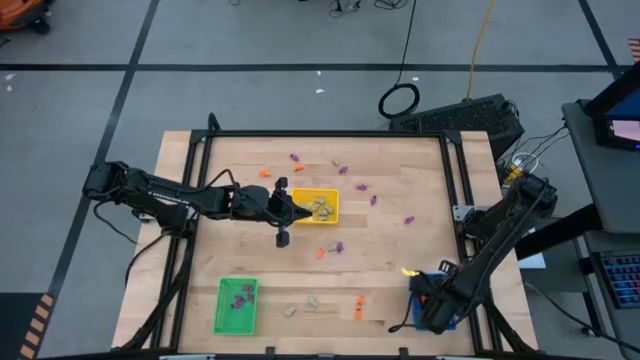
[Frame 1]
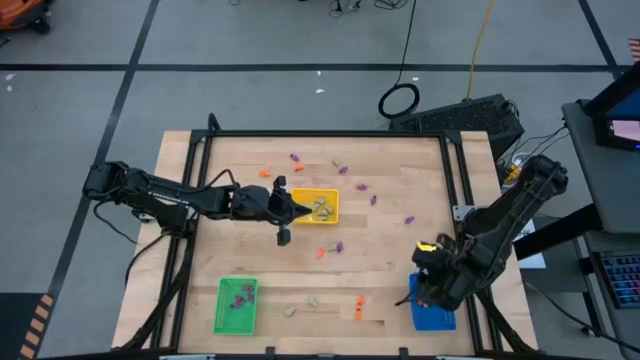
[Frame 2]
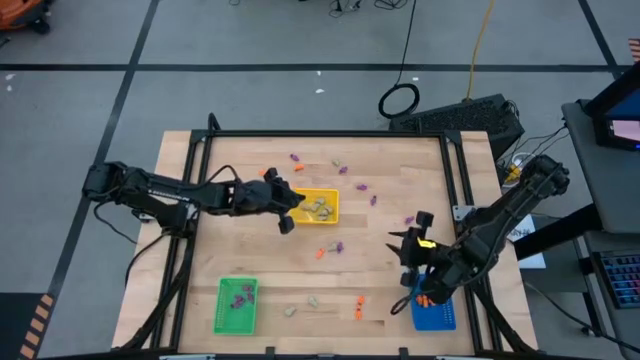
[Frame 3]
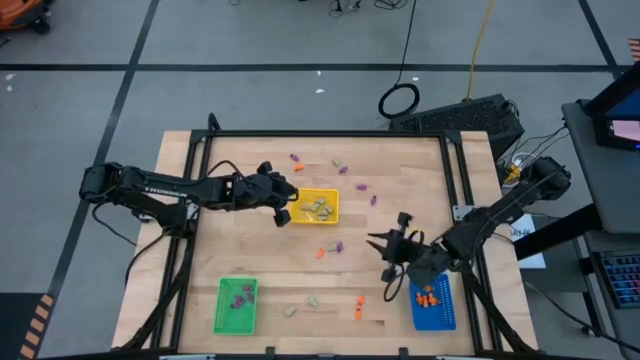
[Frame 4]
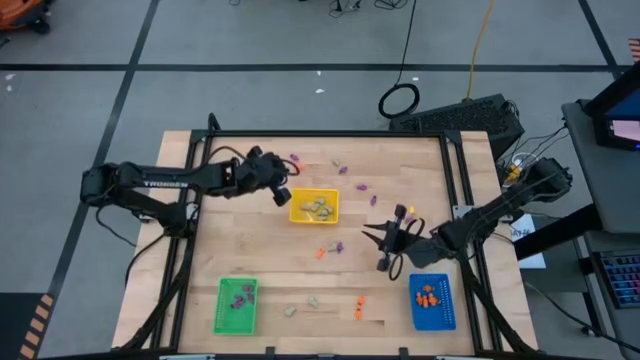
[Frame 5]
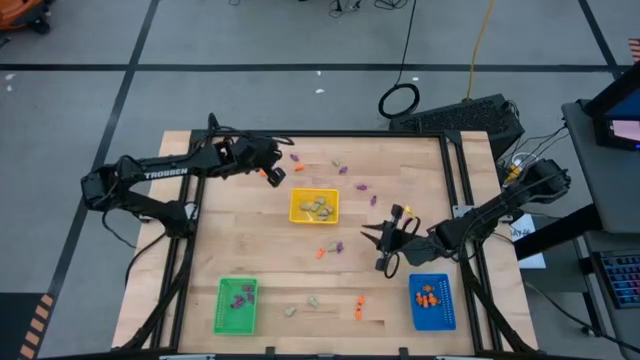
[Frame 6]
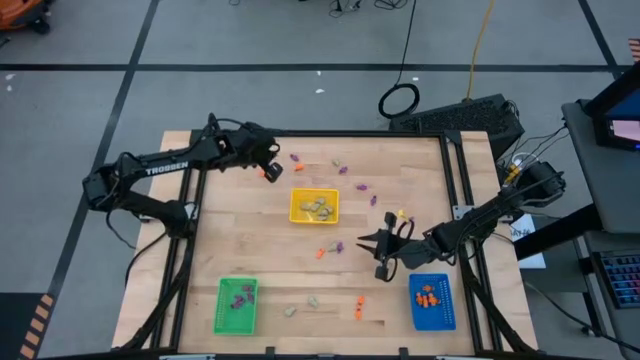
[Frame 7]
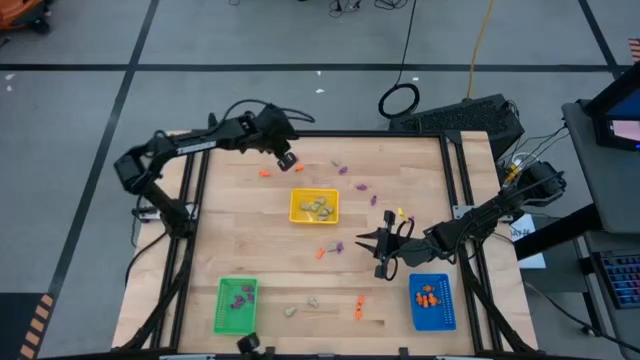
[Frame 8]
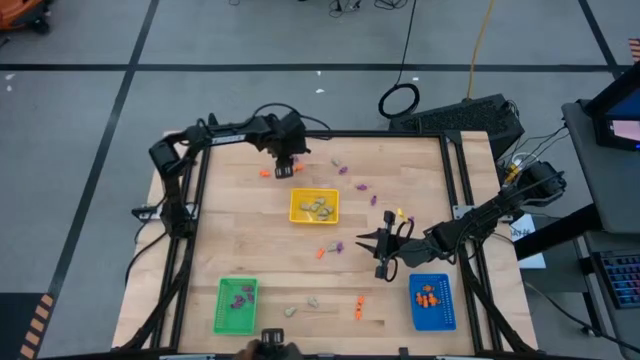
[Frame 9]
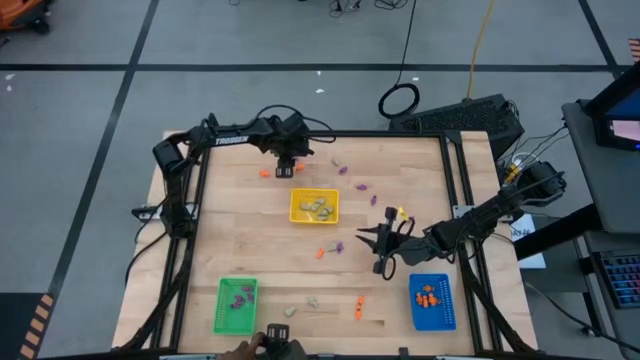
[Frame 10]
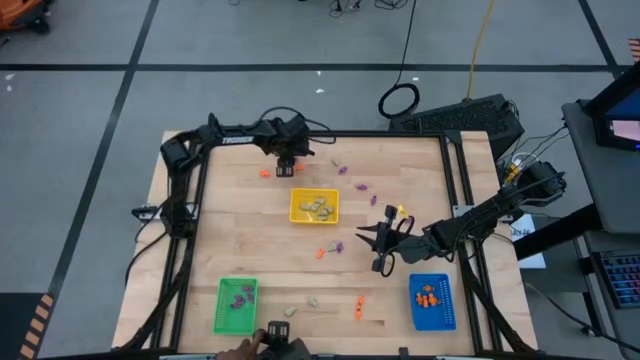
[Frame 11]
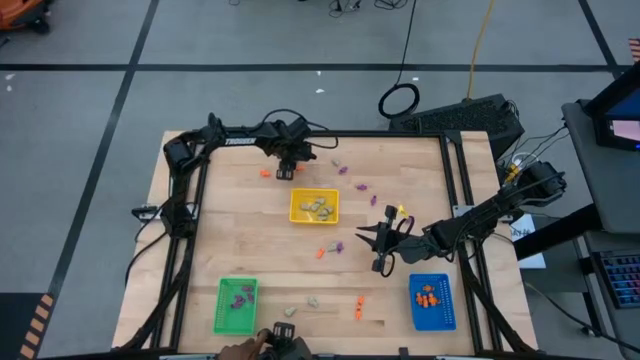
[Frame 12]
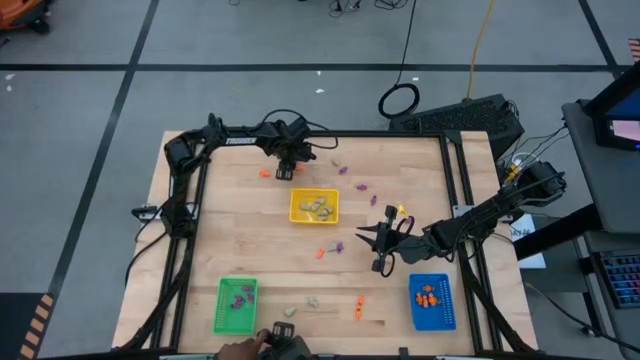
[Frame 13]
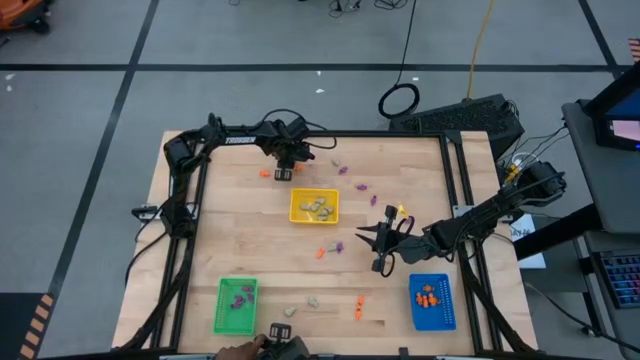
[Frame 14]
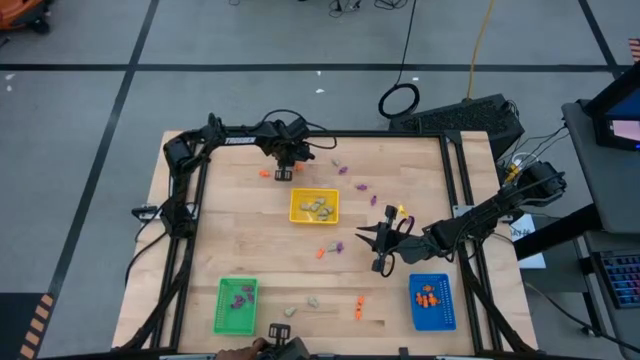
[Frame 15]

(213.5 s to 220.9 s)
Task: Sort Halloween decoration
Put the purple skeleton toy in the green basket

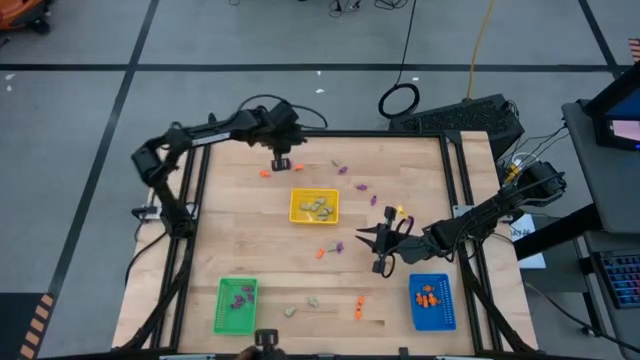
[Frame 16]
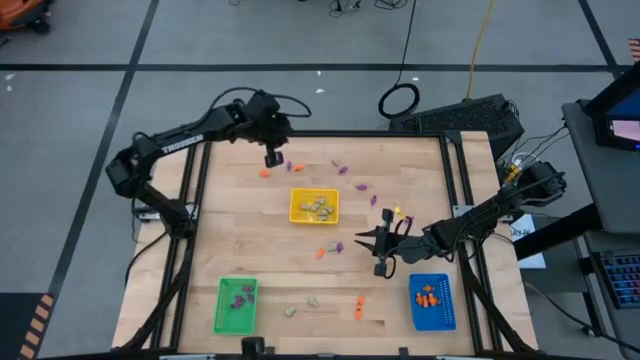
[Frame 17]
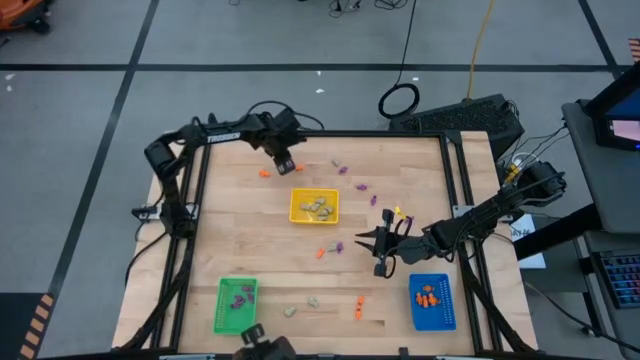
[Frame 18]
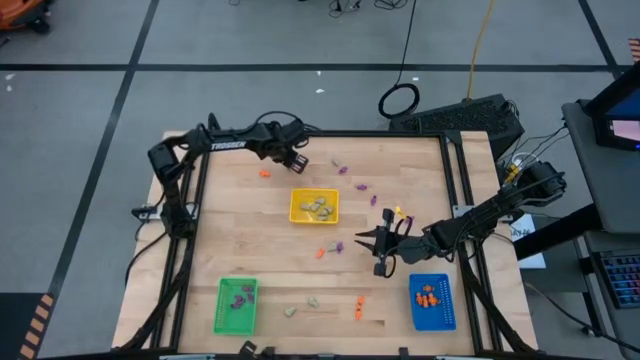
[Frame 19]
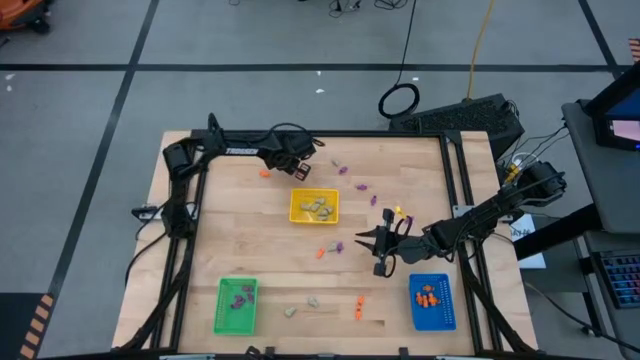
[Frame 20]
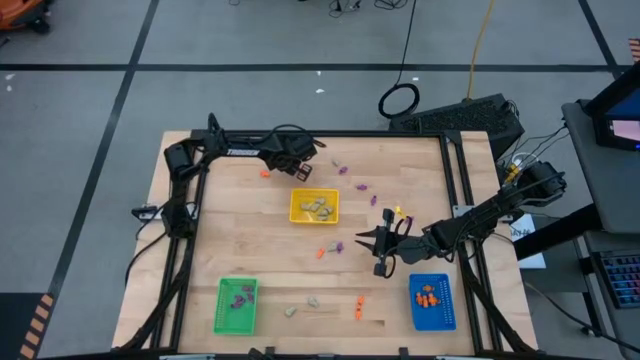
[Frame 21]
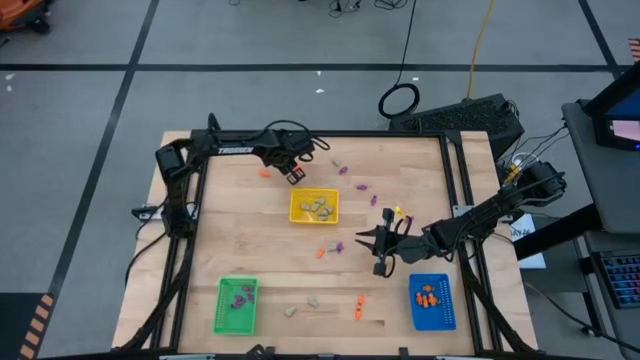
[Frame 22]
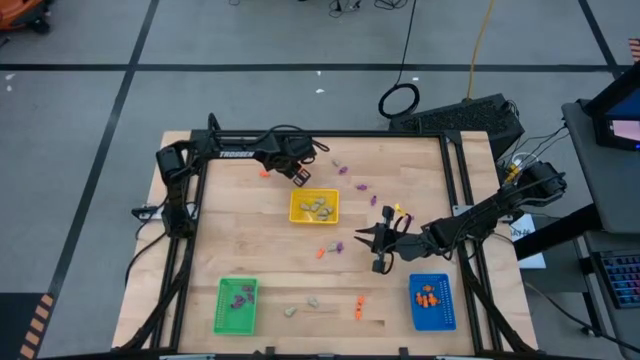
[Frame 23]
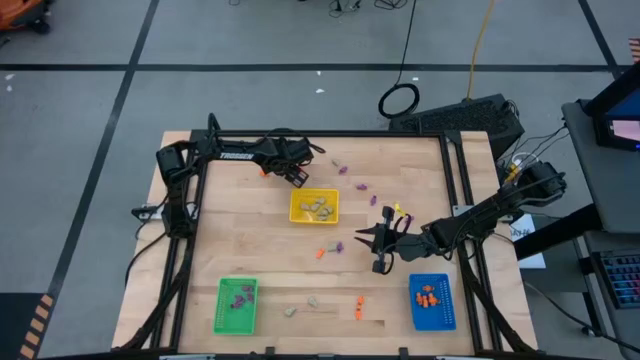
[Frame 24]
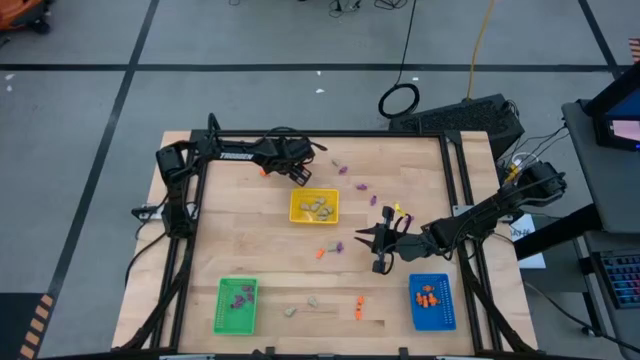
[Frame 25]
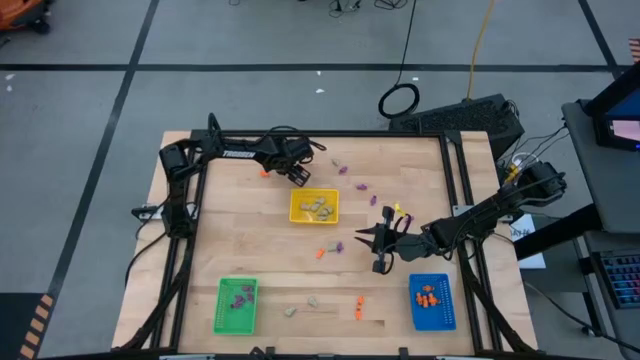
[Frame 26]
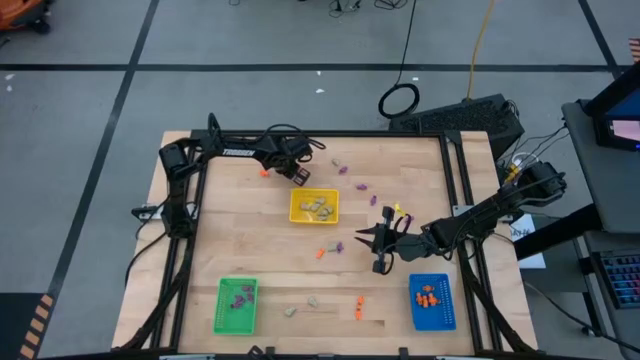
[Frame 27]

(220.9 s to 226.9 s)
Put the purple skeleton toy in the green basket

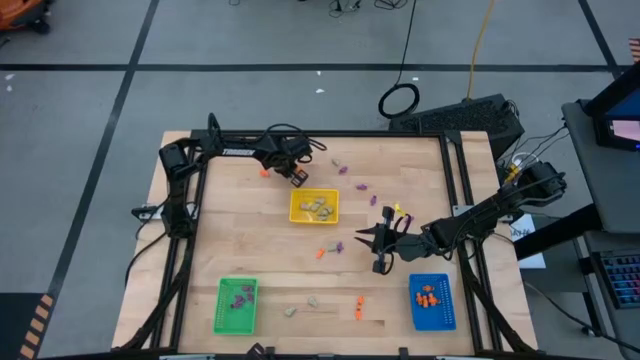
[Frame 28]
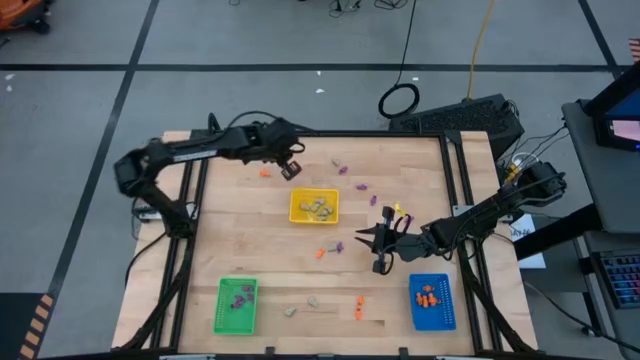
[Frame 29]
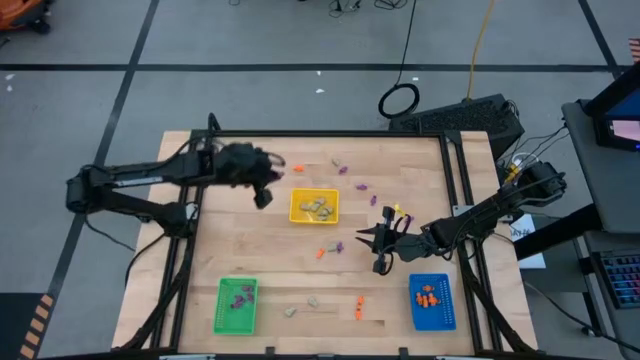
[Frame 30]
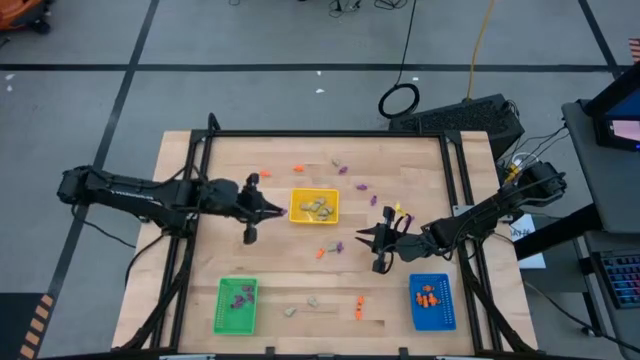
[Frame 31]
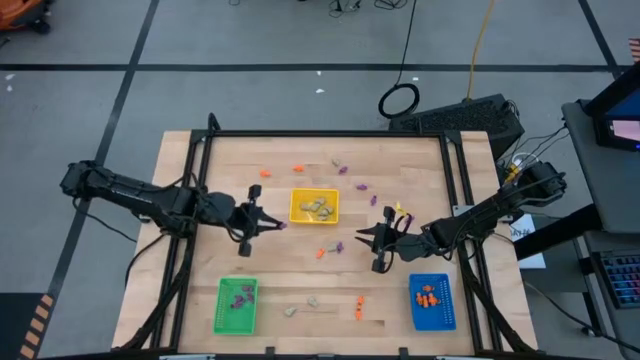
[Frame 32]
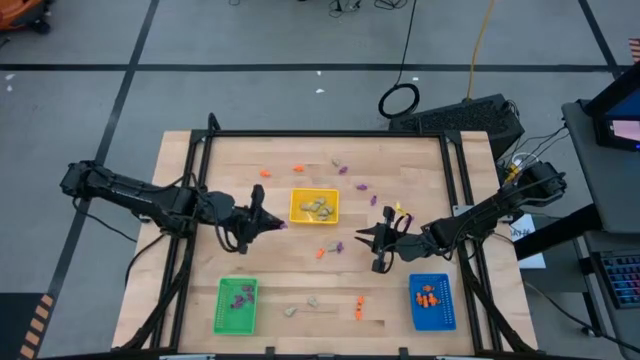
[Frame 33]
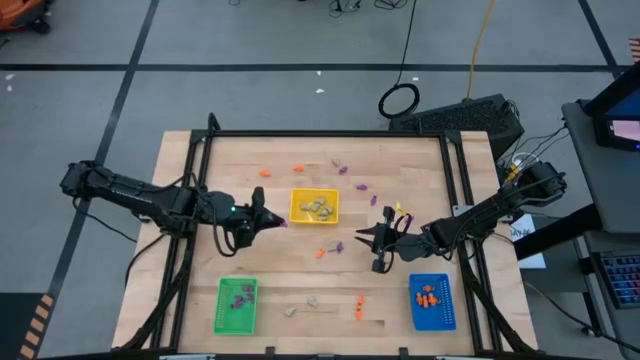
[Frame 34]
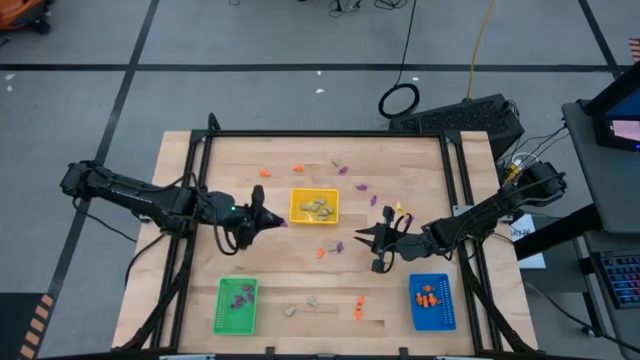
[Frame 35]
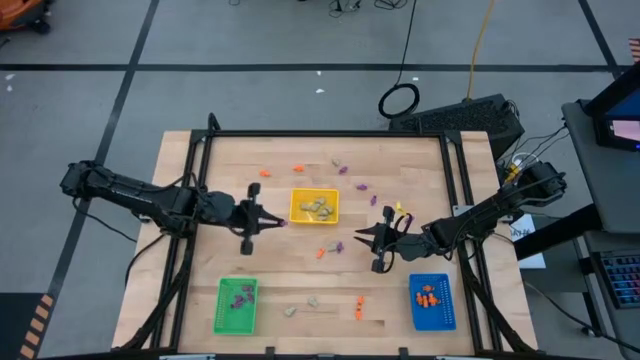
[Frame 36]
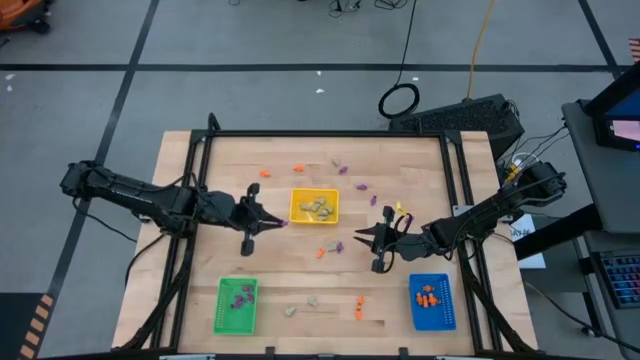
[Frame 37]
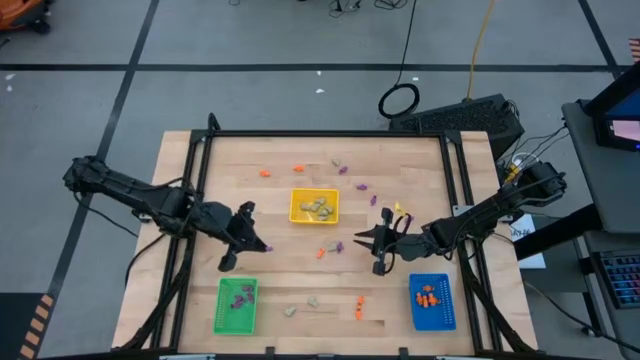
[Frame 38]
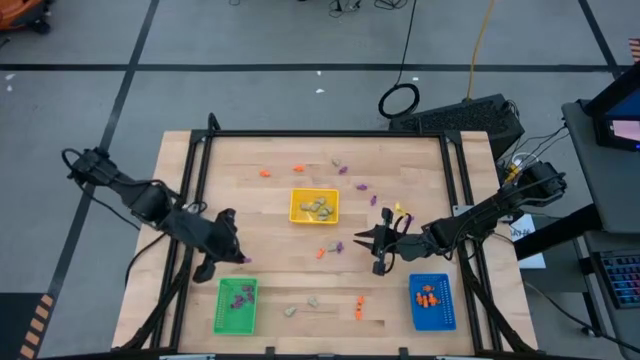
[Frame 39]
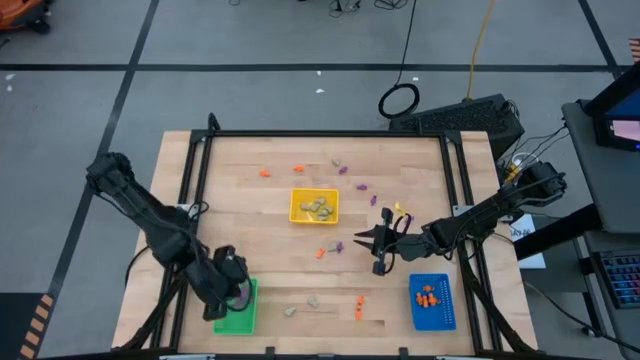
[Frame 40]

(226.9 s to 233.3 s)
Put the purple skeleton toy in the green basket
